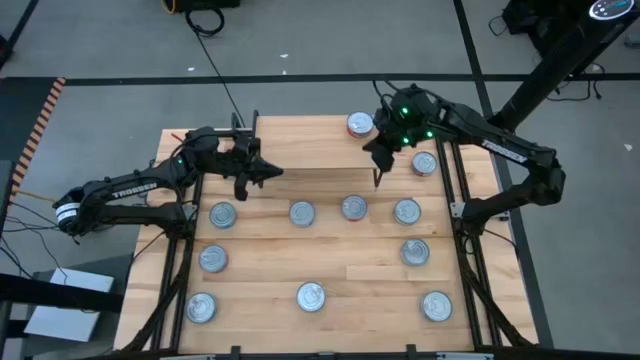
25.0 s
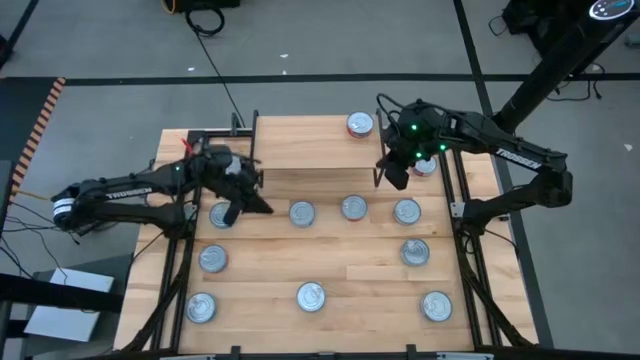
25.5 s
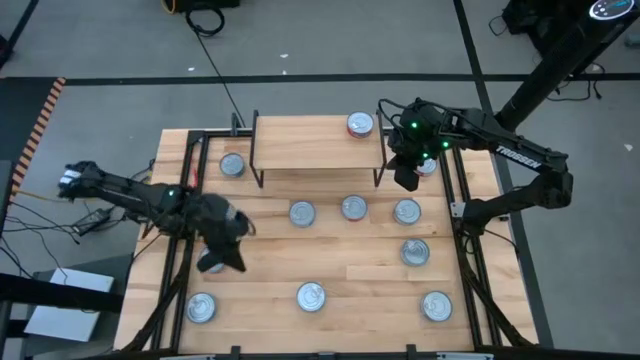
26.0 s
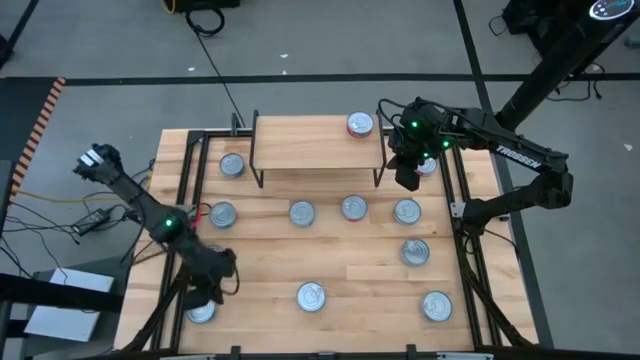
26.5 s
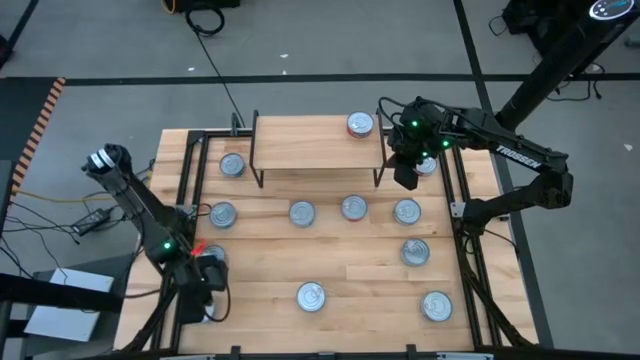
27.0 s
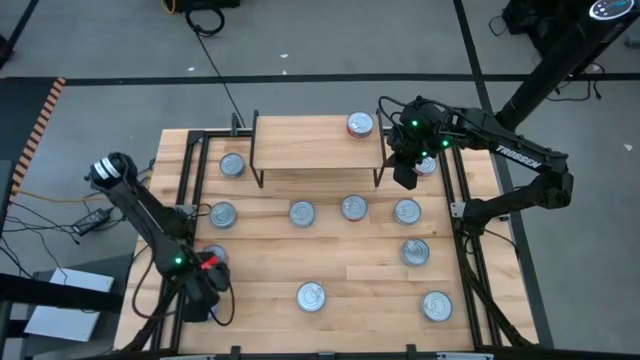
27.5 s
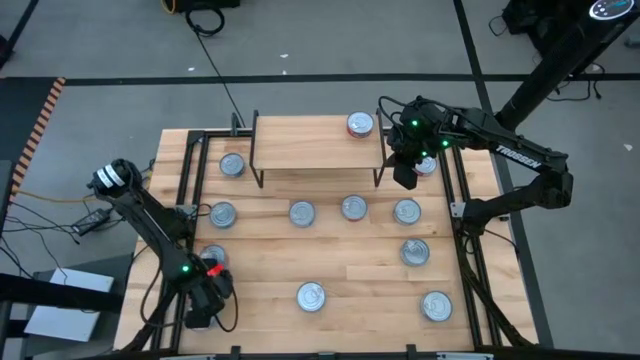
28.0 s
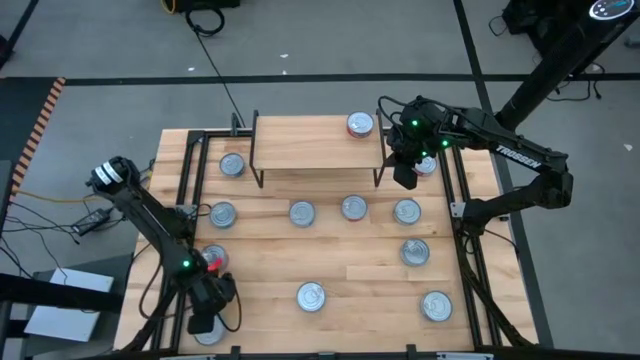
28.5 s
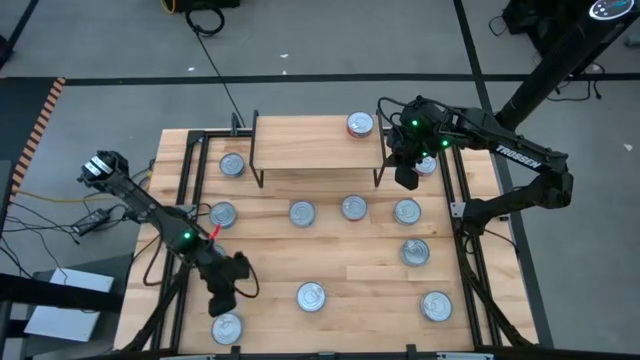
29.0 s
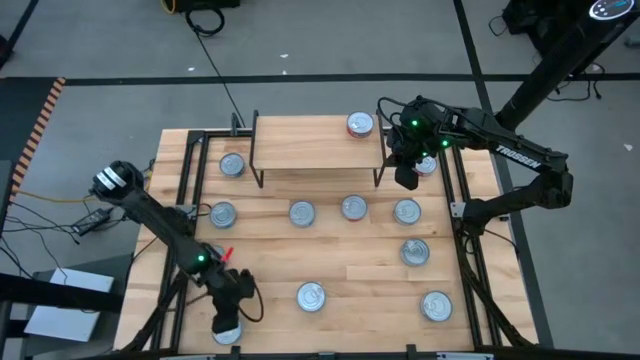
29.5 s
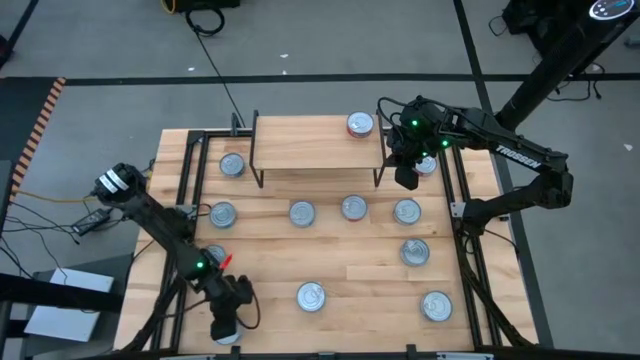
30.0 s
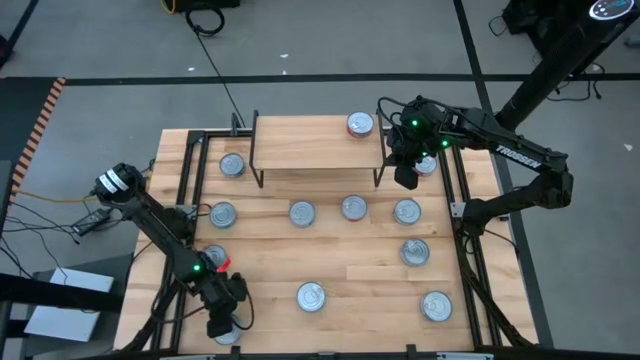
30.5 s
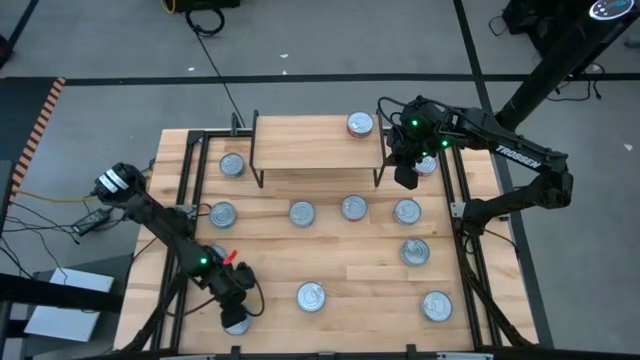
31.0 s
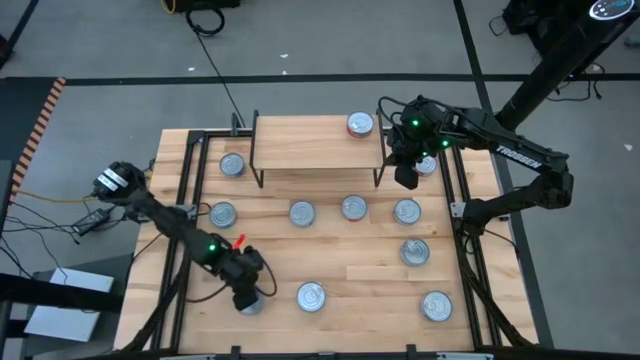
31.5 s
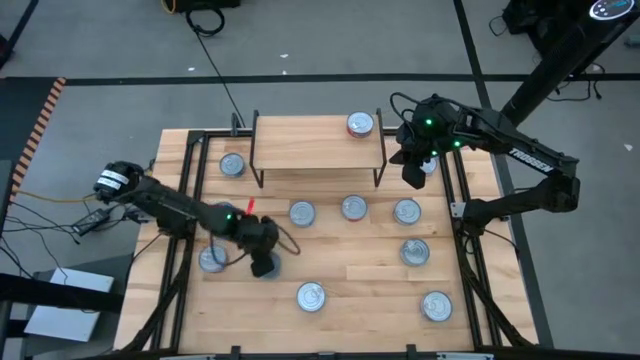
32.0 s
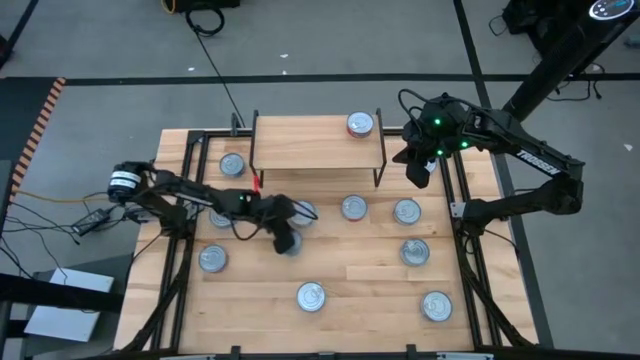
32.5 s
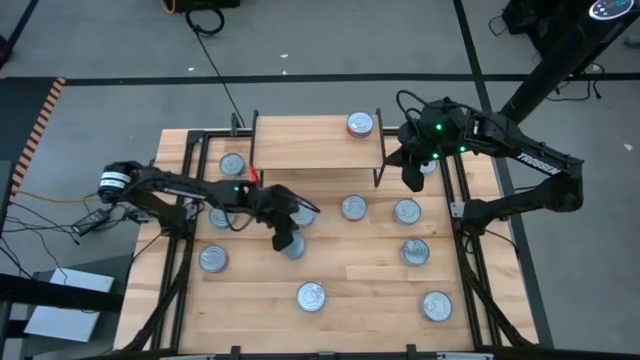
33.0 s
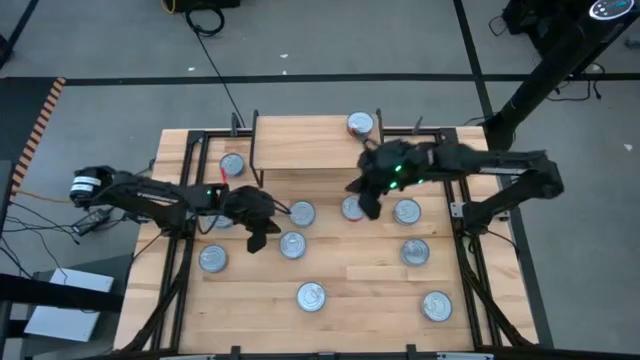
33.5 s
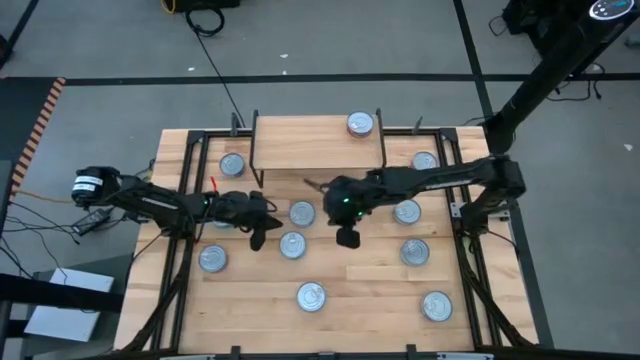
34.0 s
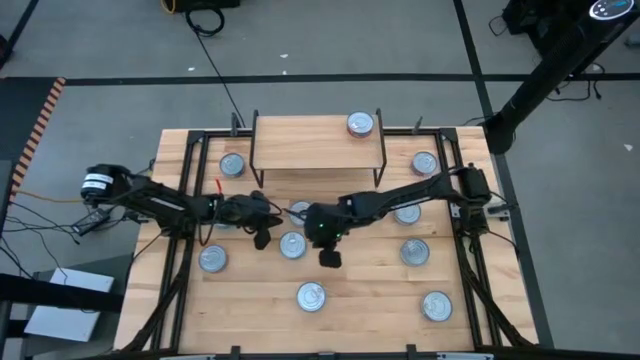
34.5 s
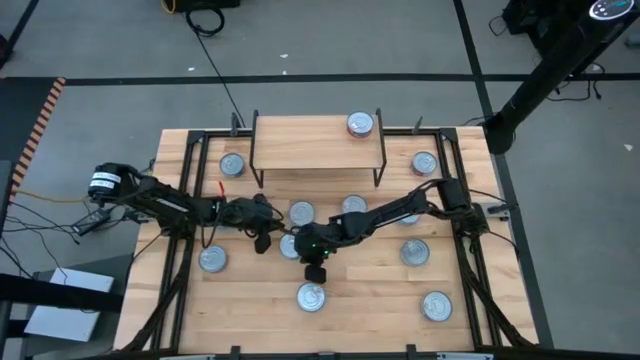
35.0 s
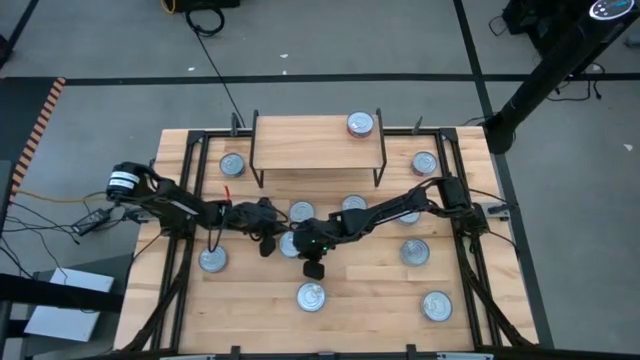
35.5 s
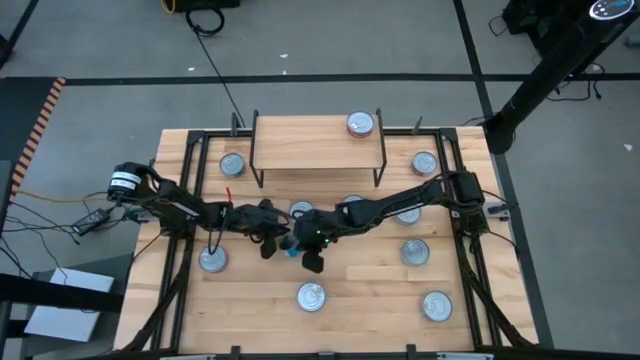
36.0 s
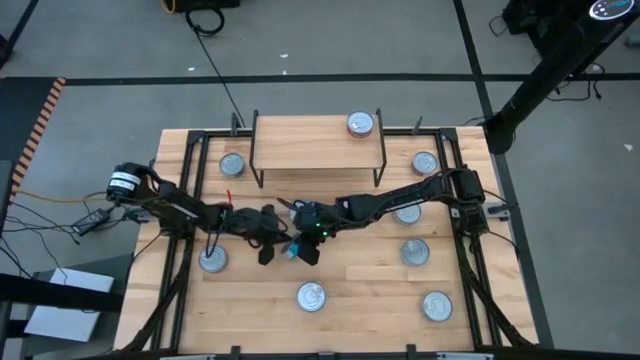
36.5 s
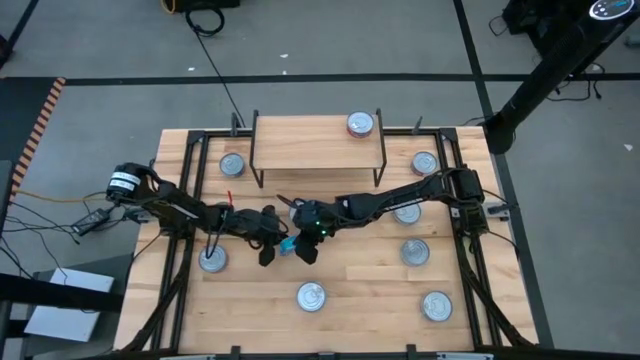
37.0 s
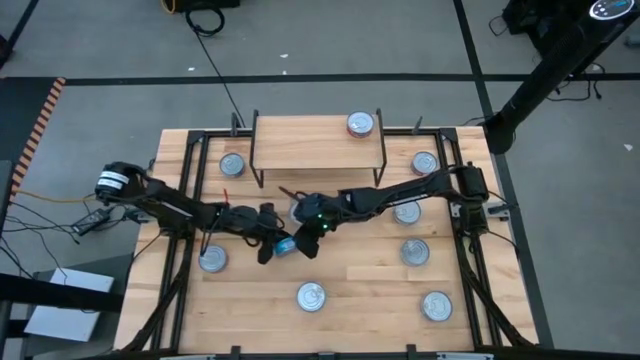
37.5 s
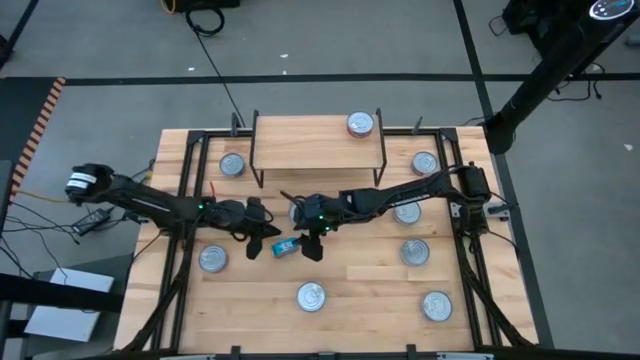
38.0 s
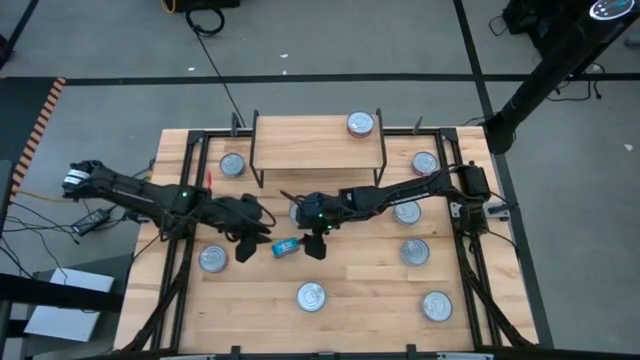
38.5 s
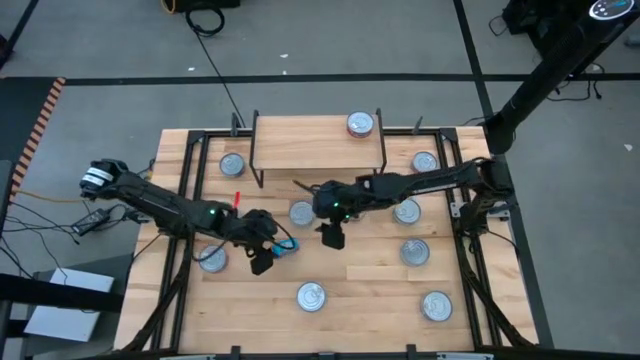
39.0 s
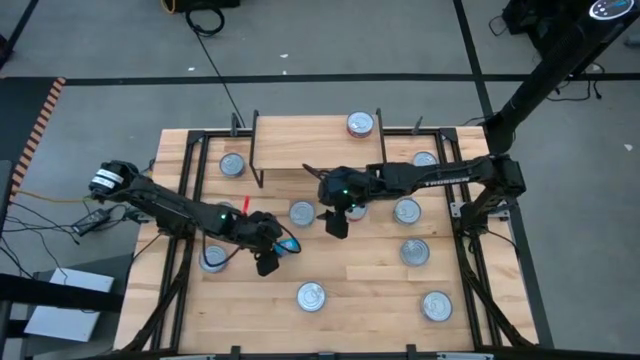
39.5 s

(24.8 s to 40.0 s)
Task: Stack canned seafood by type on shelf
Put the yellow-blue tuna can on the shelf

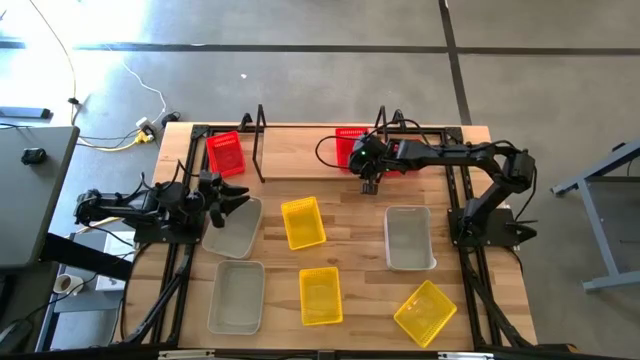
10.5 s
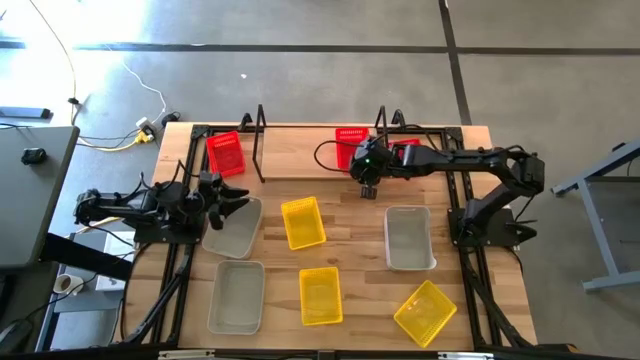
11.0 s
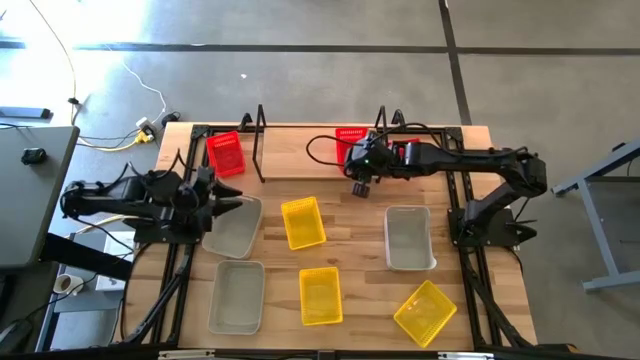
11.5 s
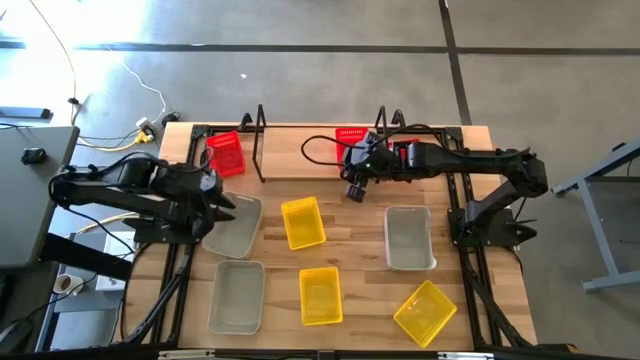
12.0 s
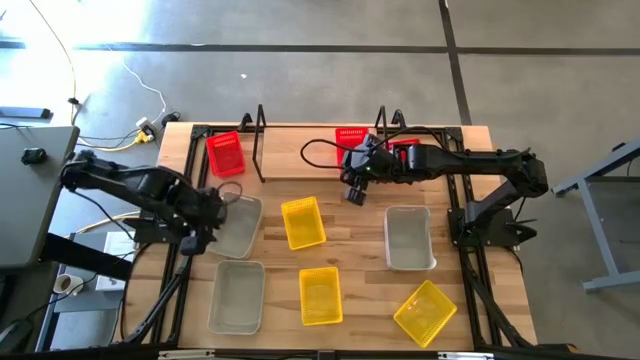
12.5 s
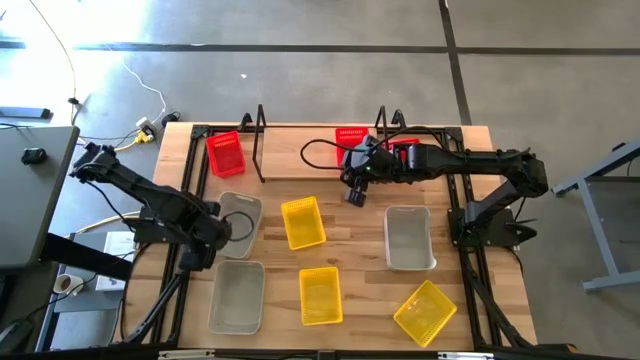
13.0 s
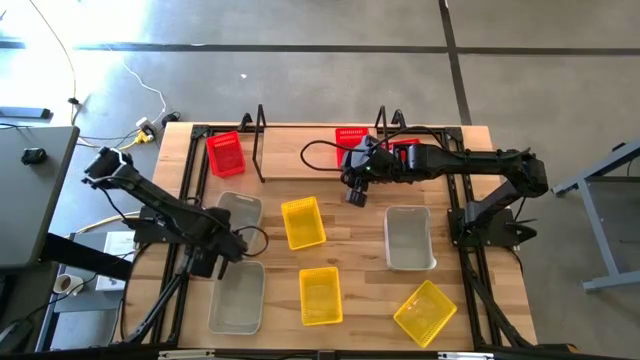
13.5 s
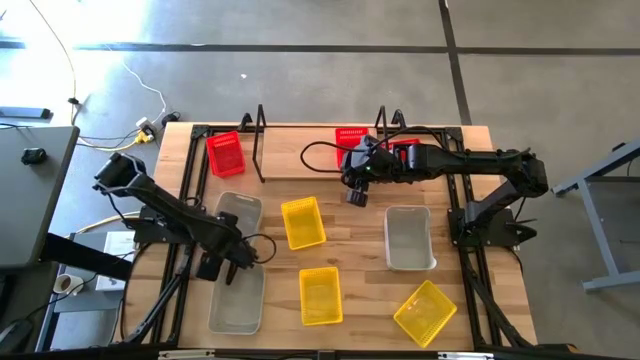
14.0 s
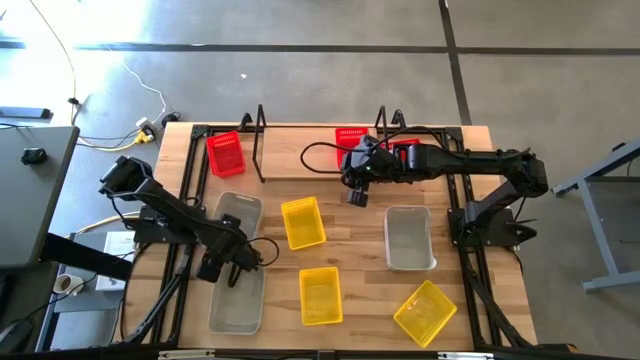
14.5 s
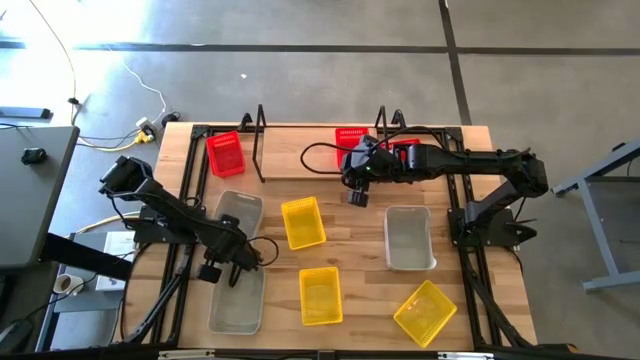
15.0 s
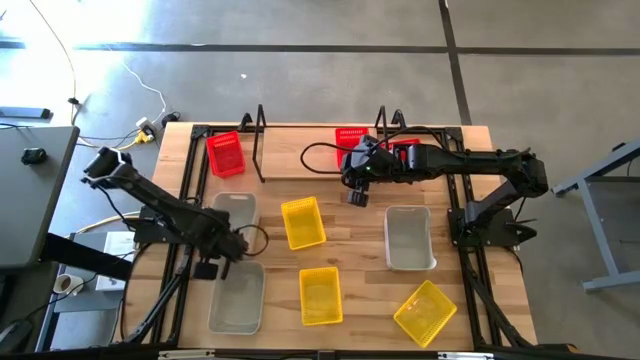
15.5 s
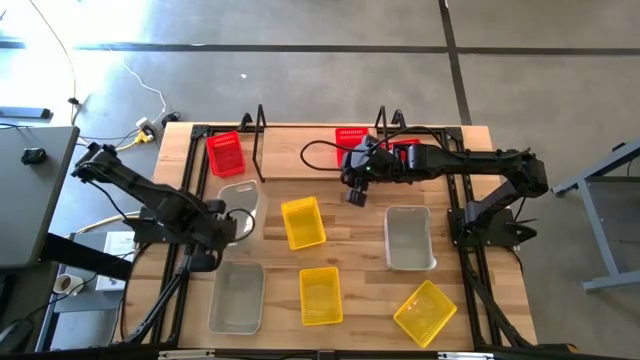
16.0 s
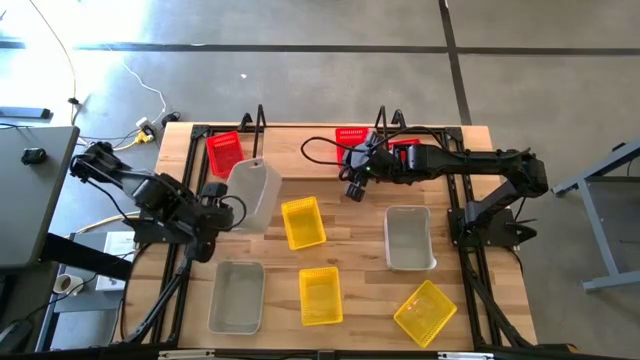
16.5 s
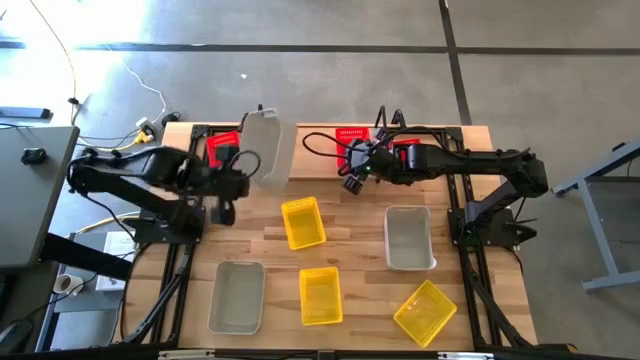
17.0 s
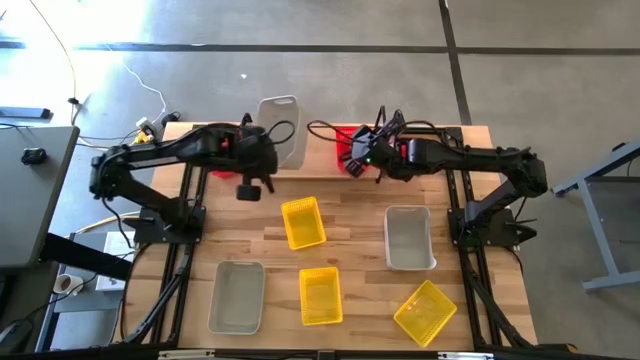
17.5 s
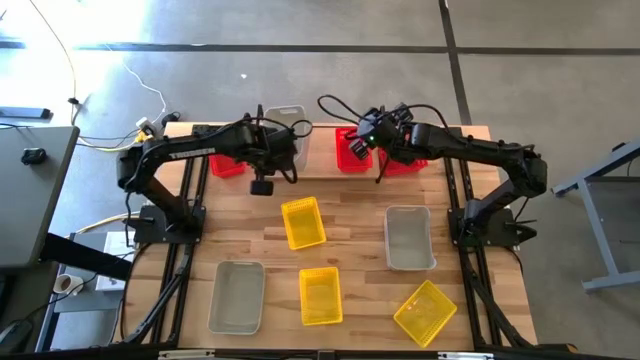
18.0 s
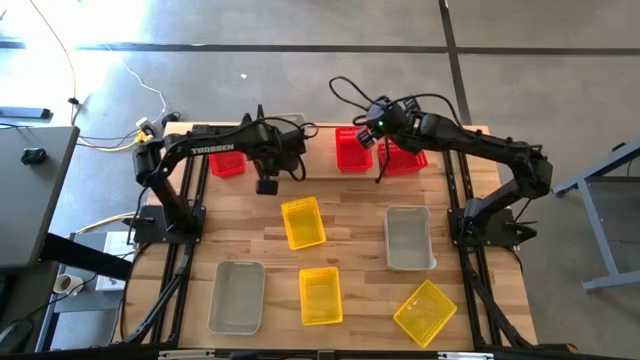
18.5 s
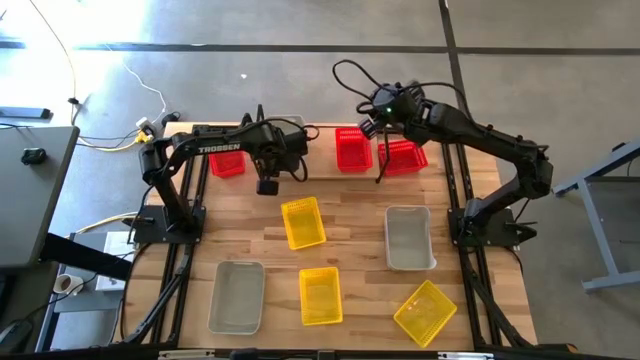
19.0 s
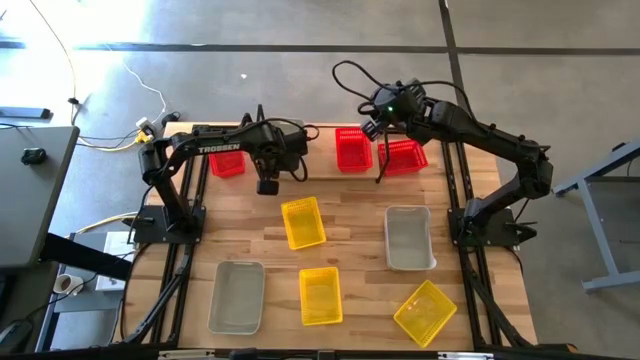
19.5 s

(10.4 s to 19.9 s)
Task: Stack baskets on shelf by color
Put the top left gray bin on the shelf
